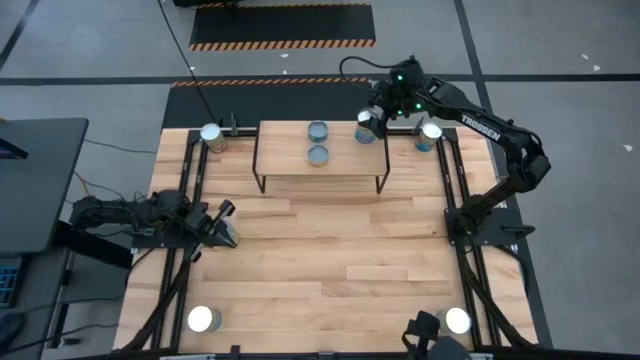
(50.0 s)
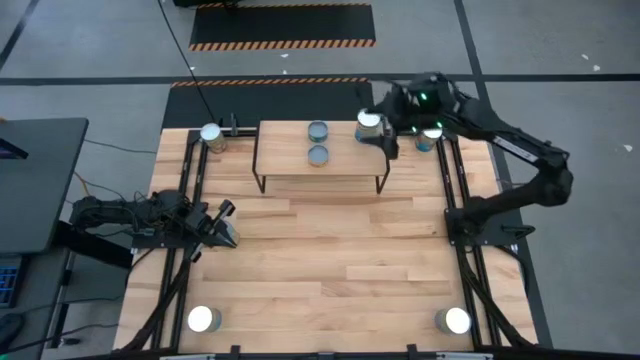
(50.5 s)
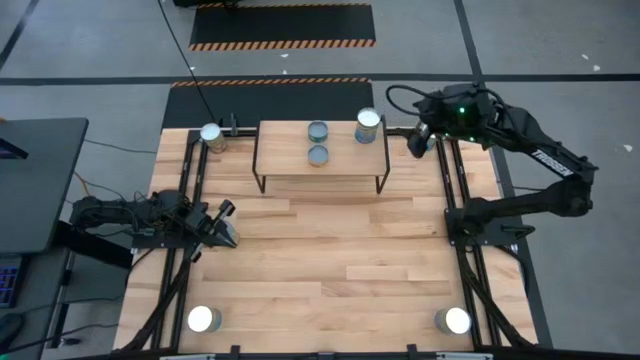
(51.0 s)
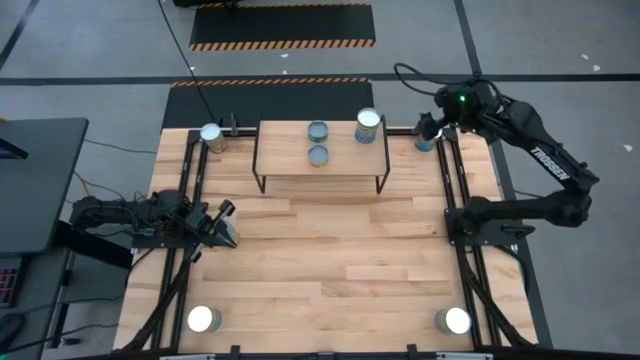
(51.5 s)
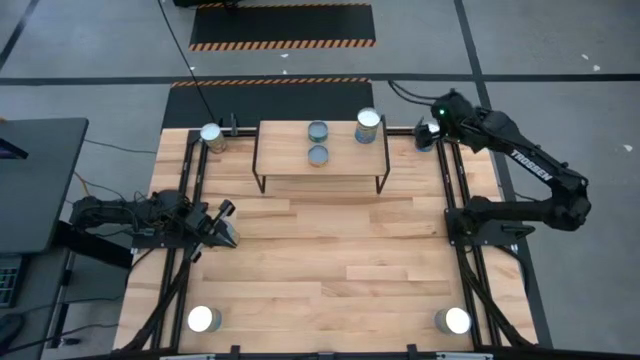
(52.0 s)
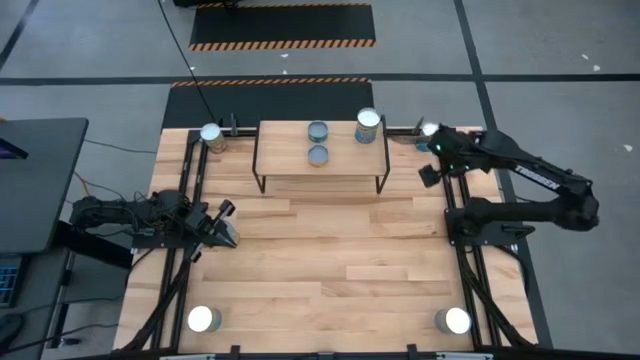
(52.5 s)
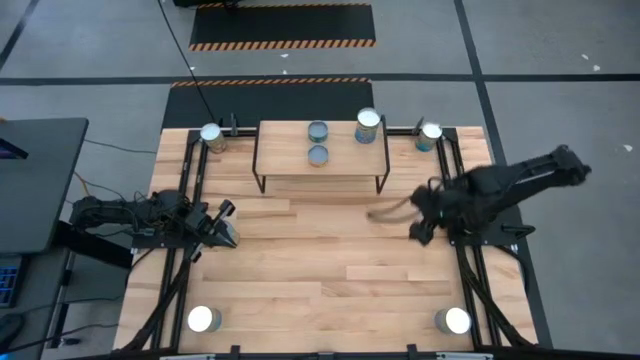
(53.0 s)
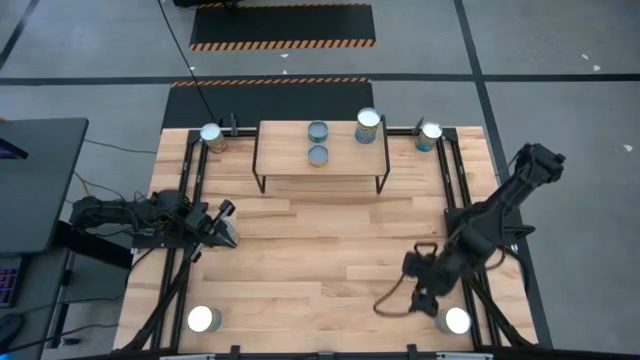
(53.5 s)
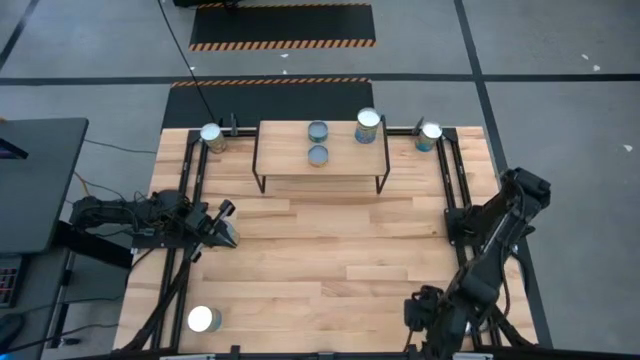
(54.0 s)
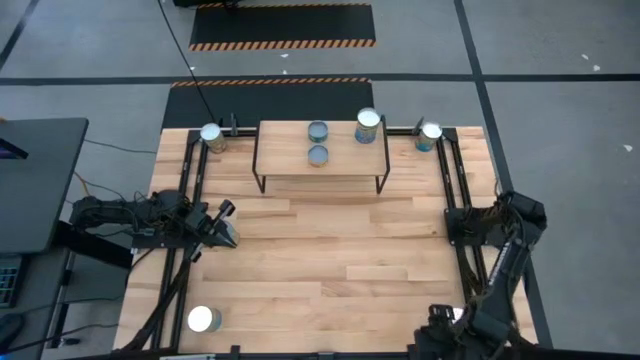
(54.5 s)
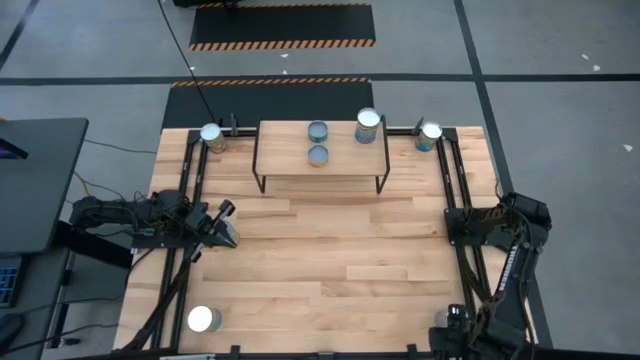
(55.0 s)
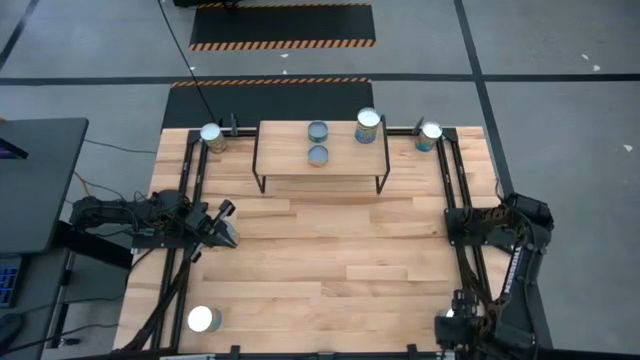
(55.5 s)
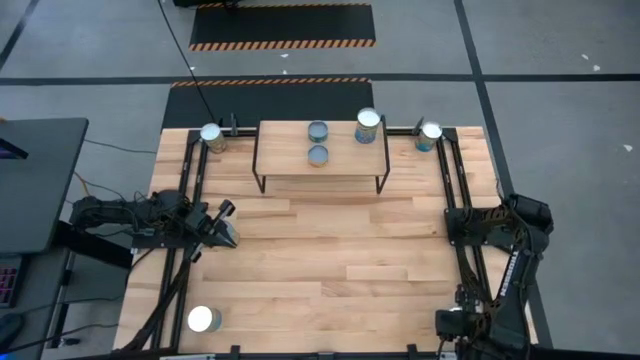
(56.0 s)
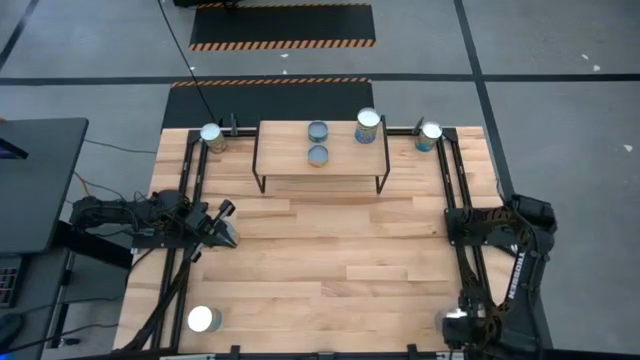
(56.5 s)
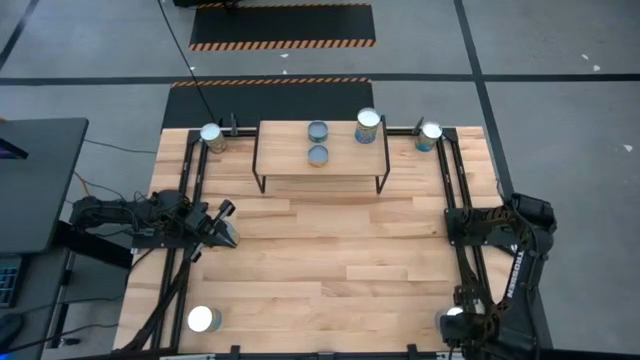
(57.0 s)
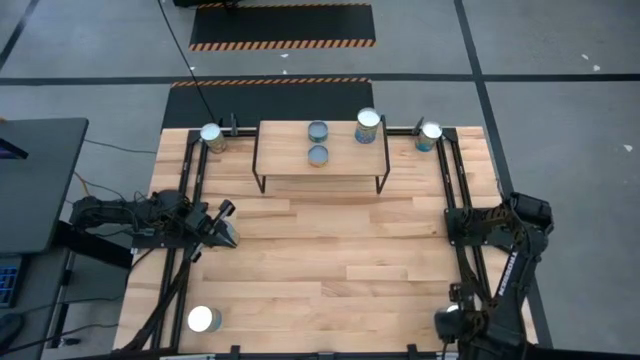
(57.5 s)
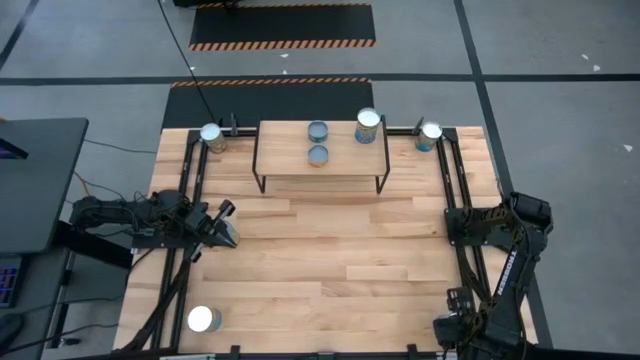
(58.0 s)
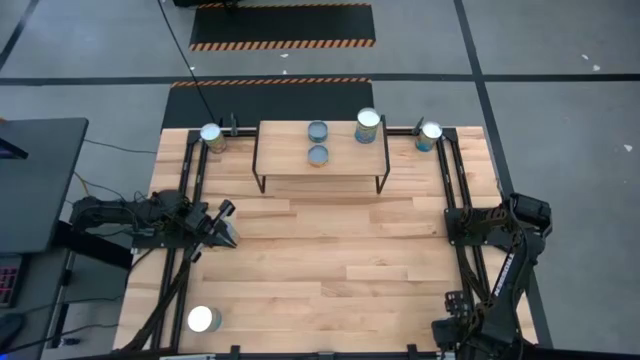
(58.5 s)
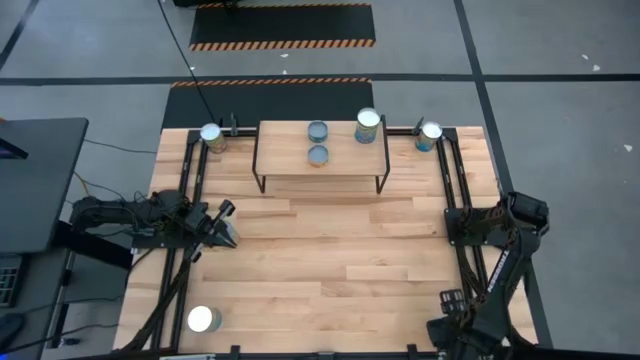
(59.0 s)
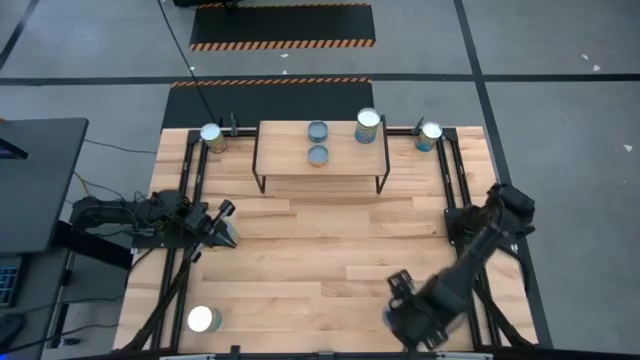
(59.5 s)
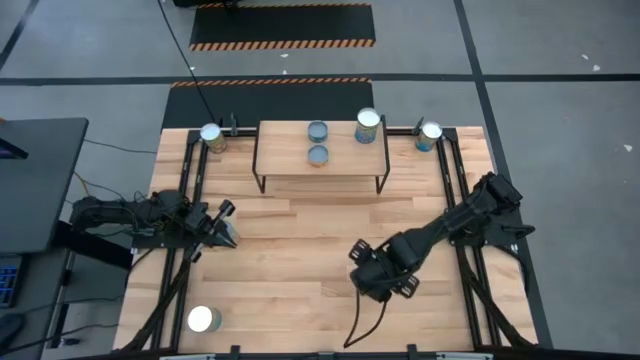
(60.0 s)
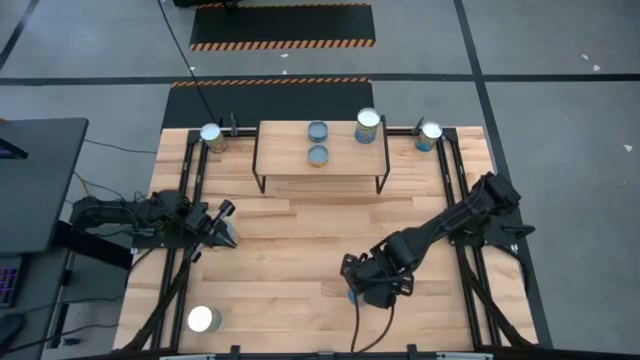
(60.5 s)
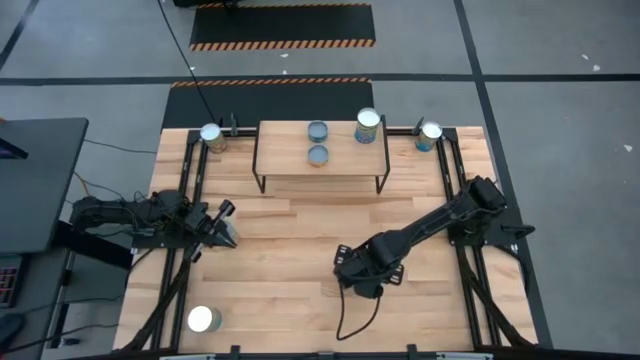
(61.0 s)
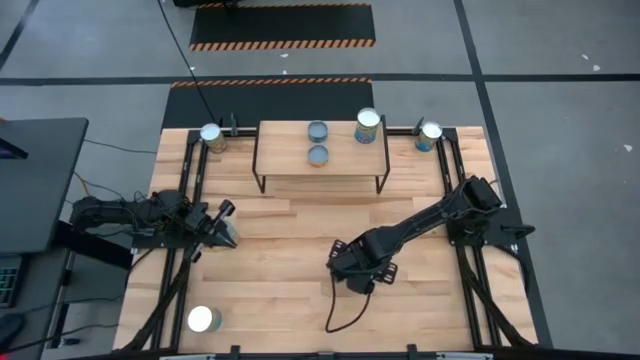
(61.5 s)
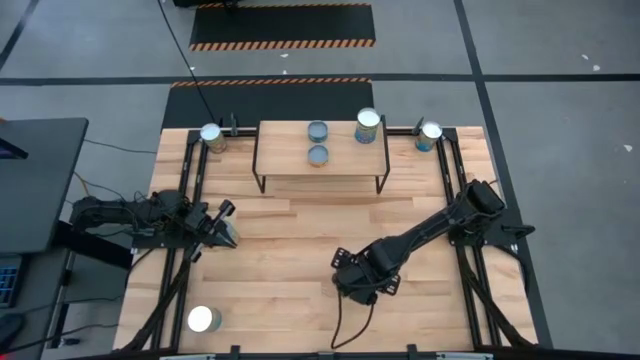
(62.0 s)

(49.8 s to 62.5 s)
Task: Pick and place cans onto a shelf
Put the big blue canned cherries on the shelf aligned with the other big blue canned cherries

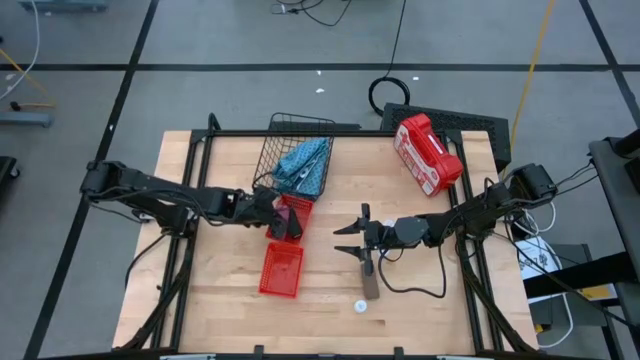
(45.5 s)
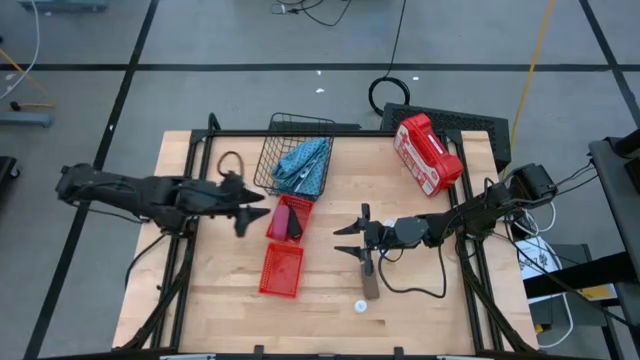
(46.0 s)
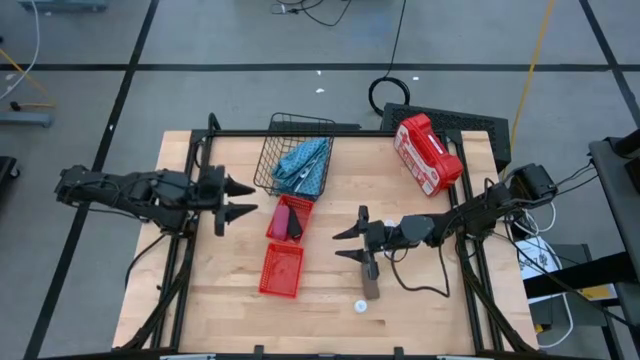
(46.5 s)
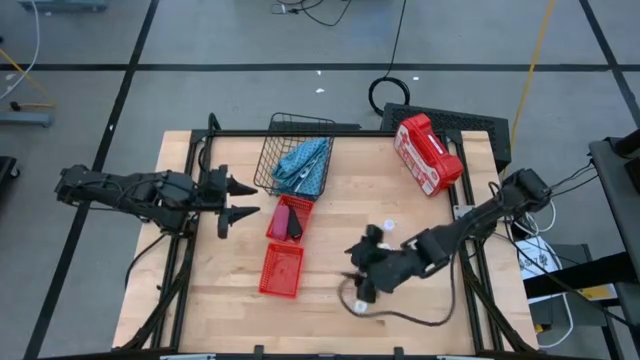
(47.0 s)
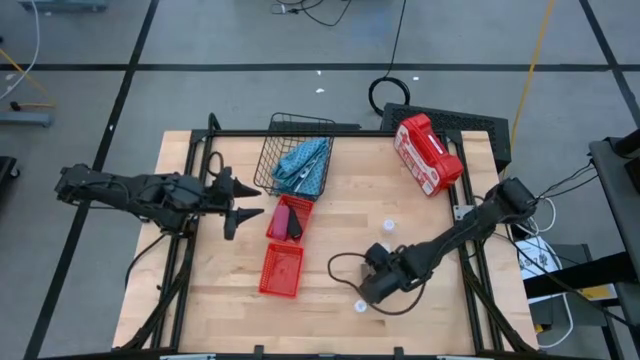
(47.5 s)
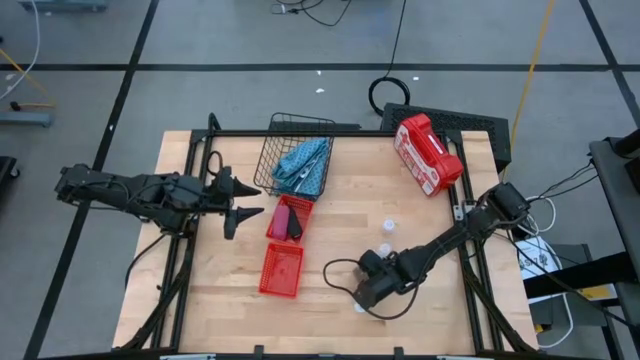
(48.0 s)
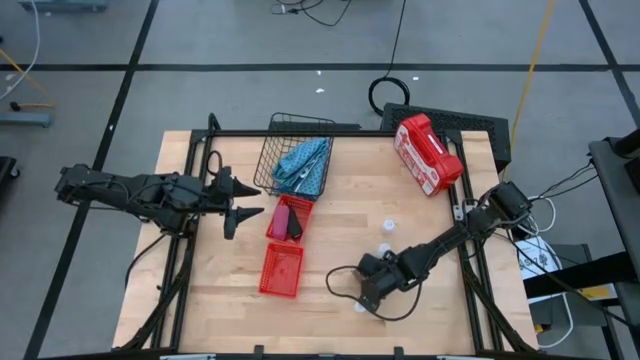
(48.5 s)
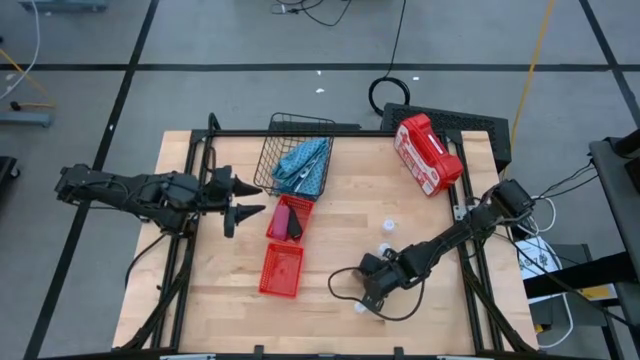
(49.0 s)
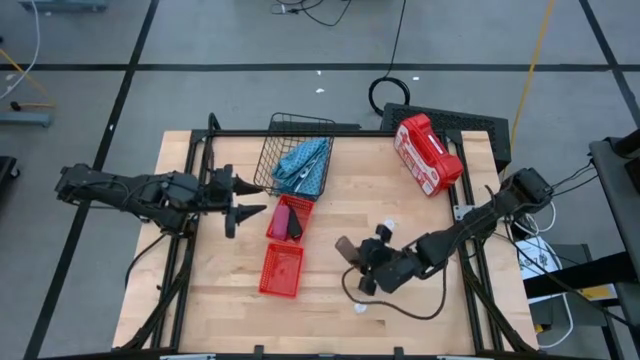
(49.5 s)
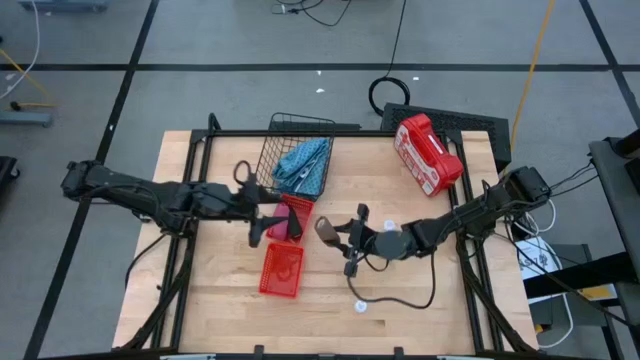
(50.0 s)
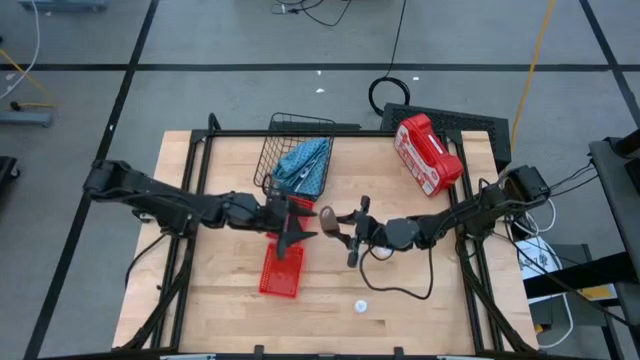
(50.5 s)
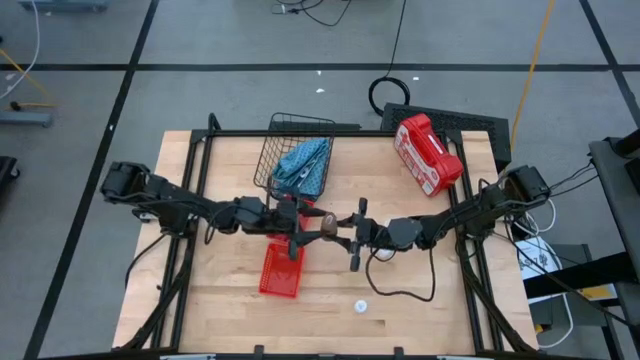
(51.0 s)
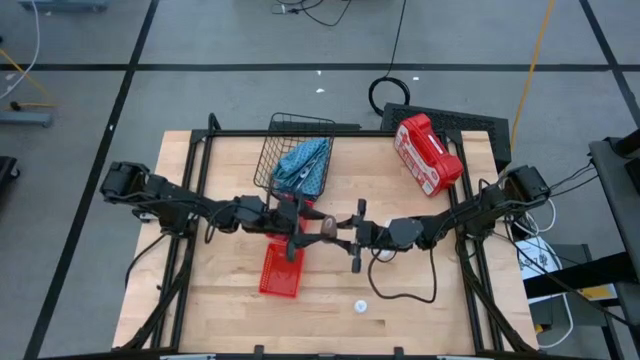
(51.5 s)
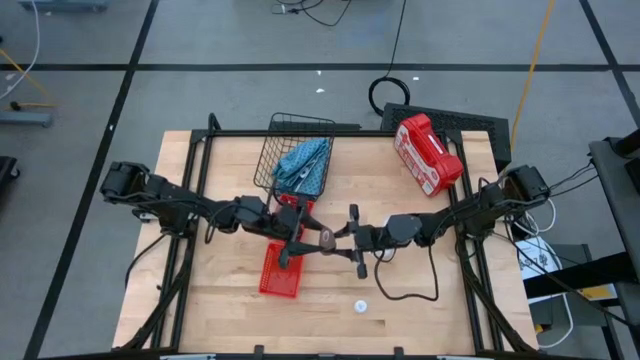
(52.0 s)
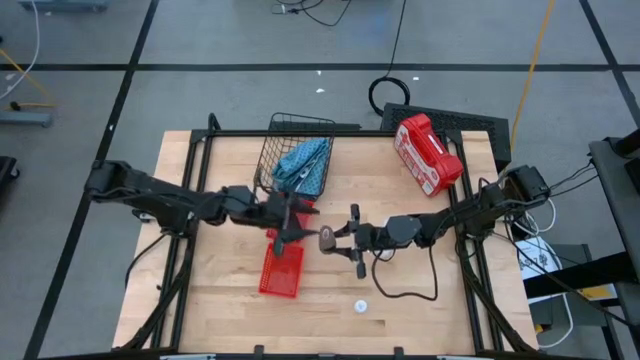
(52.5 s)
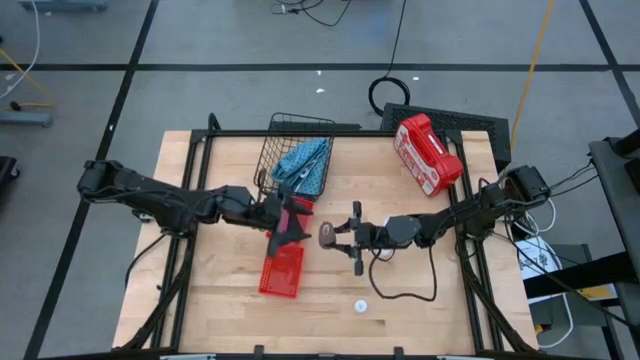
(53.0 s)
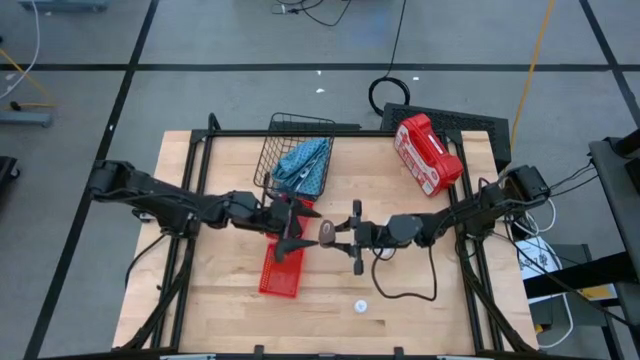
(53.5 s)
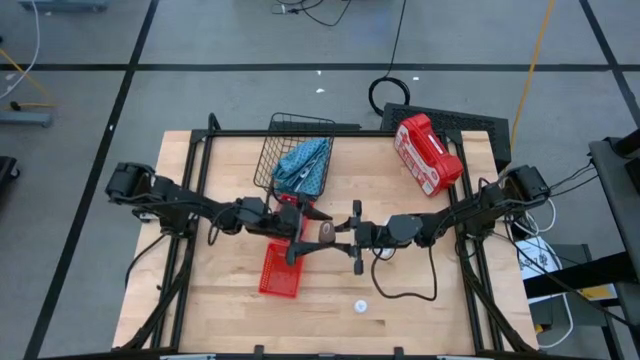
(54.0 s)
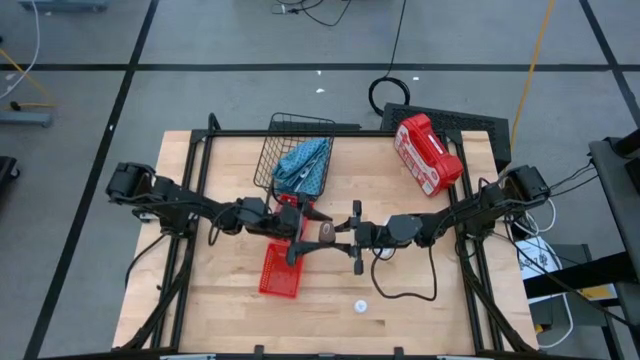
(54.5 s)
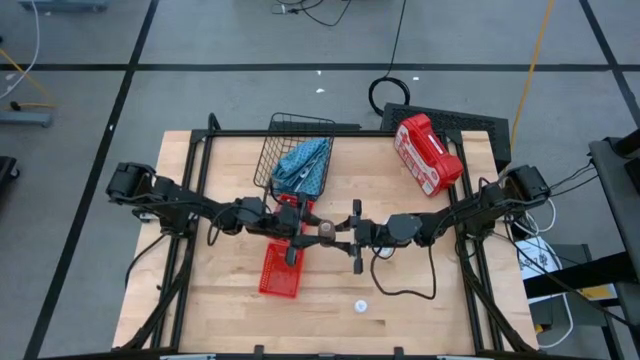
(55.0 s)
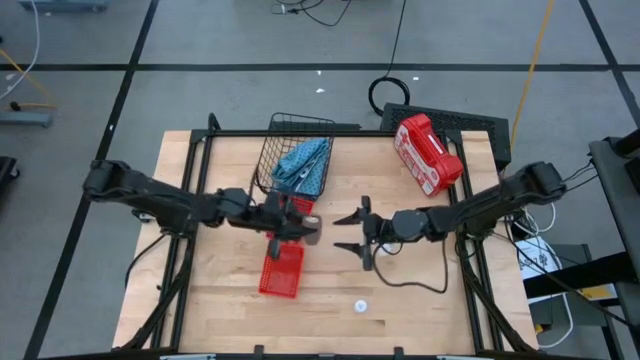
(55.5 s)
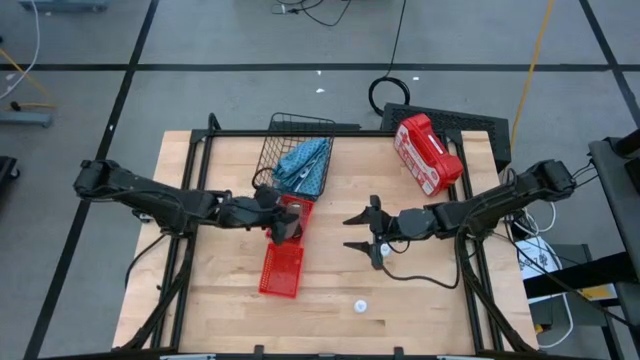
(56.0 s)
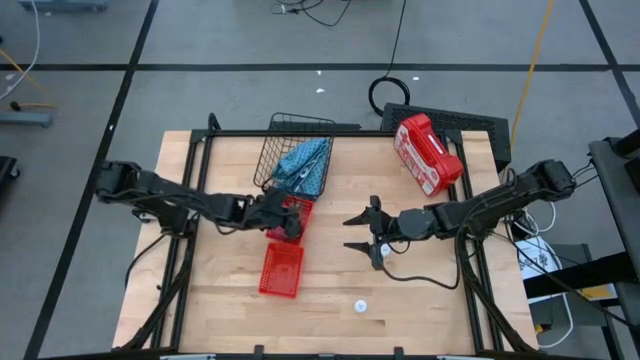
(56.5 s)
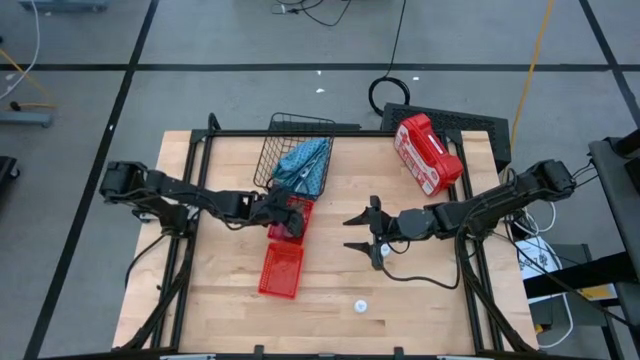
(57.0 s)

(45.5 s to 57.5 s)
Task: Pick & place medical supplies in basket/bin
Put the brown bandage into the top red bin
